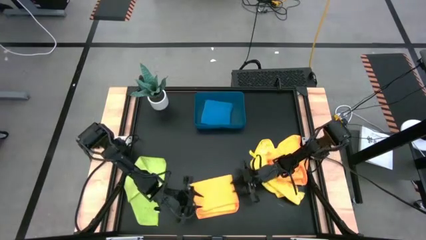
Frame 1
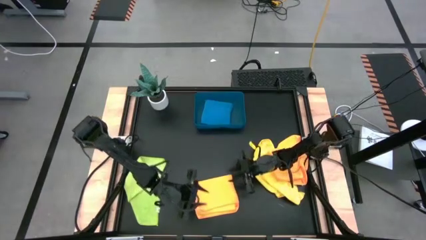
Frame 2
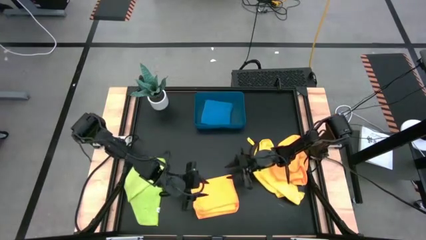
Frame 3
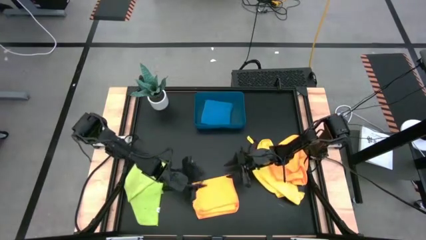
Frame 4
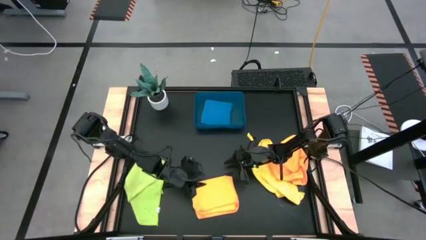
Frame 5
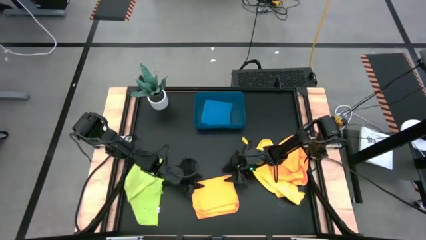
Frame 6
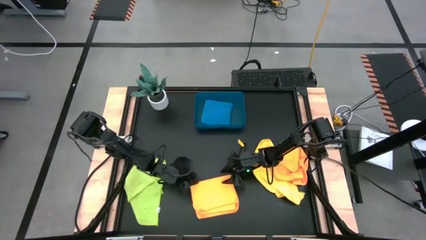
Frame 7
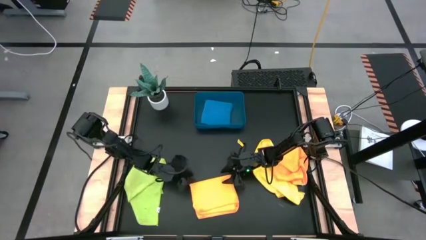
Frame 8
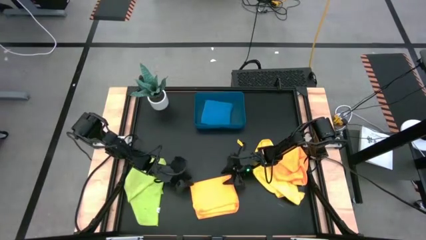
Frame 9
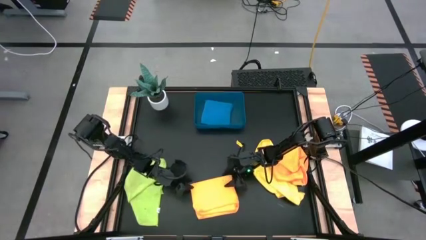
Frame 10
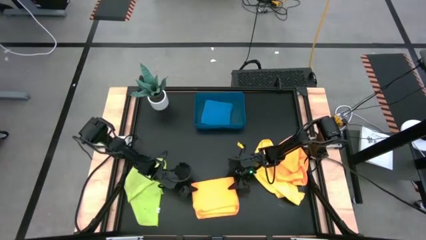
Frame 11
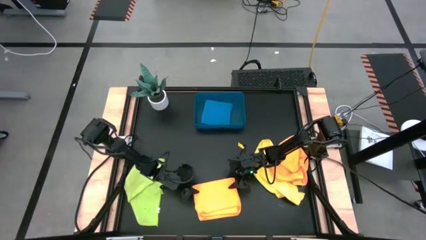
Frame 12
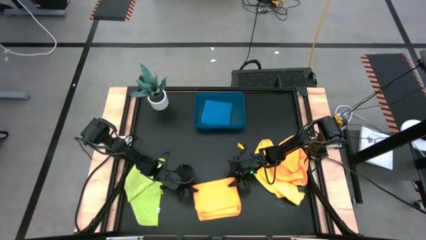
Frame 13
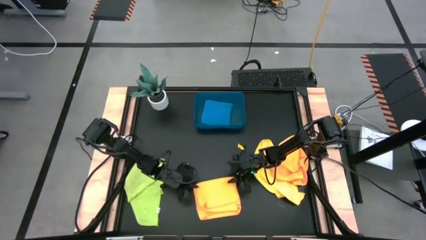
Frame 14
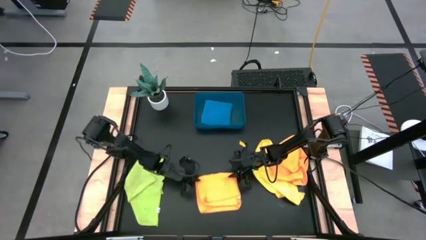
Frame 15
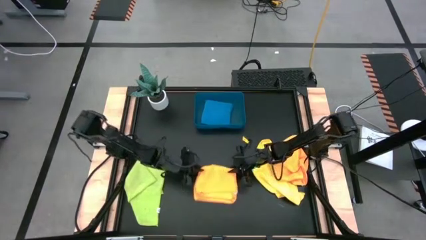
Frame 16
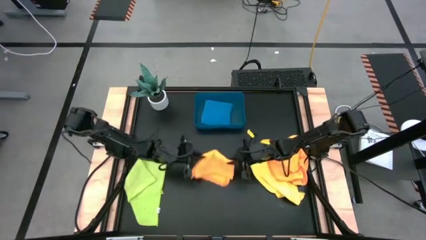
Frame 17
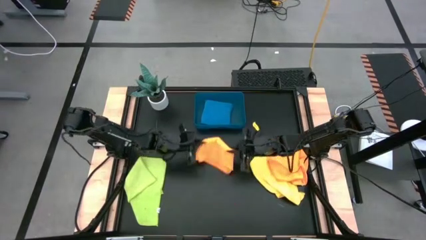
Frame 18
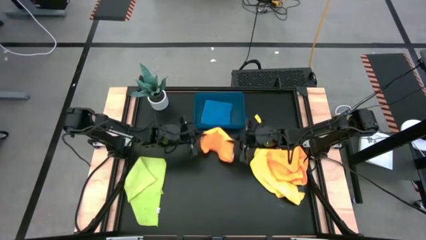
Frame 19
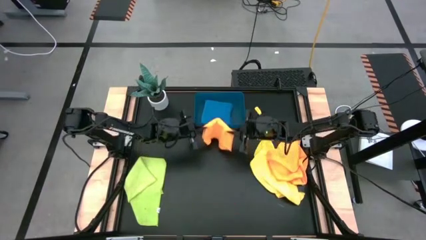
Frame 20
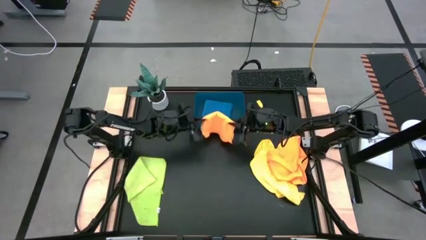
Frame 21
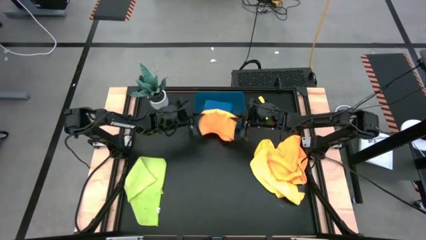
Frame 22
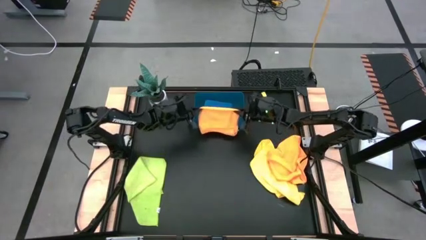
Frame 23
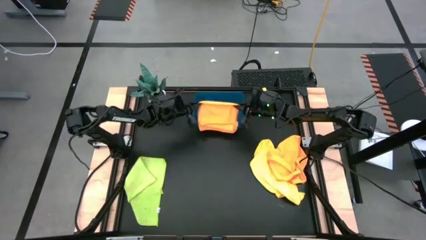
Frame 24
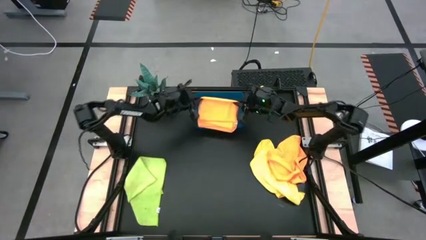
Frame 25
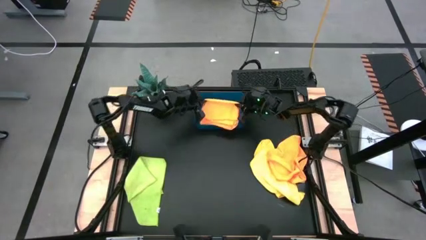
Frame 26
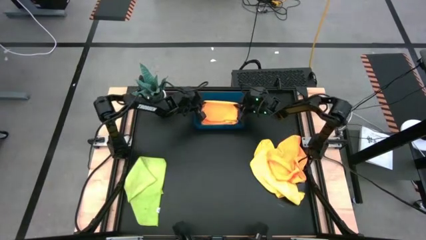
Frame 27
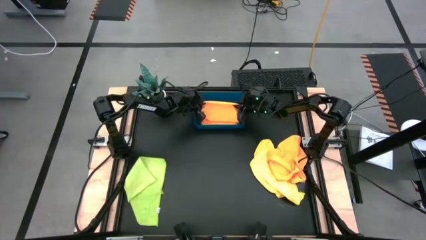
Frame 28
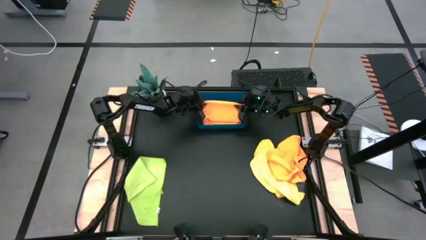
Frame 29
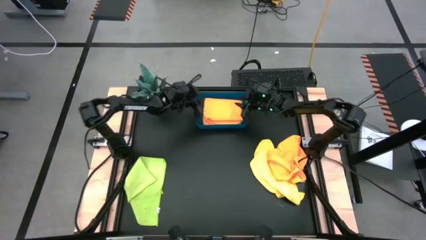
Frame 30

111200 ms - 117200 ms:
Task: Fold microfiber towels
Put the left orange microfiber cloth

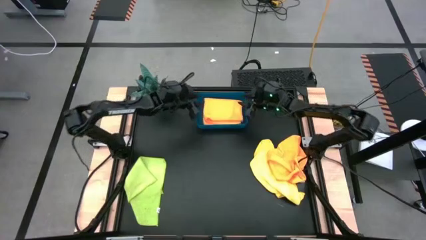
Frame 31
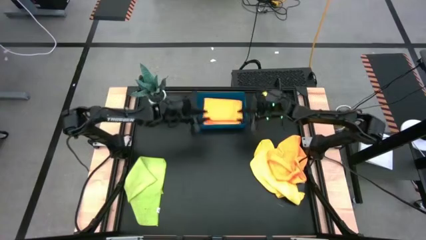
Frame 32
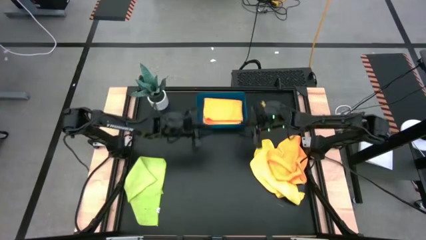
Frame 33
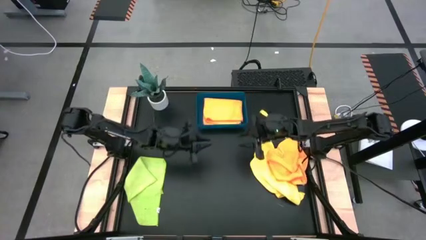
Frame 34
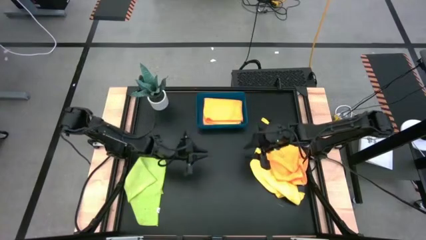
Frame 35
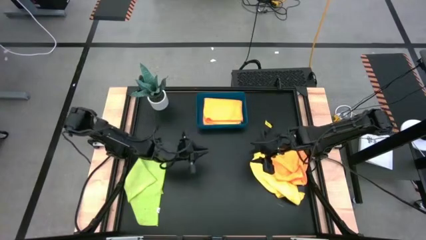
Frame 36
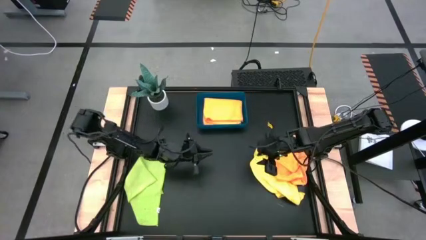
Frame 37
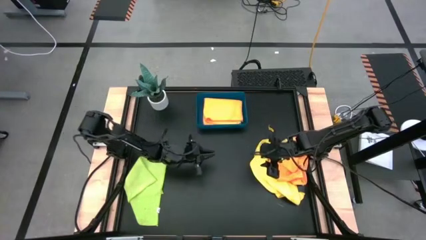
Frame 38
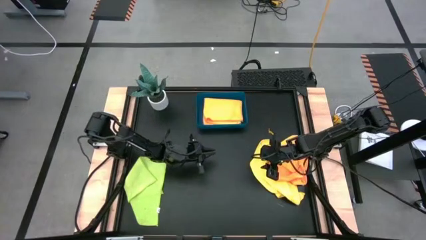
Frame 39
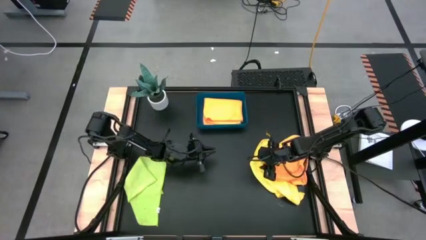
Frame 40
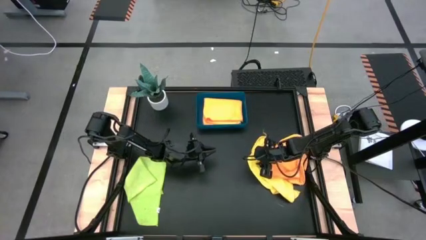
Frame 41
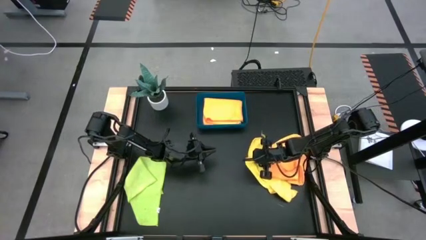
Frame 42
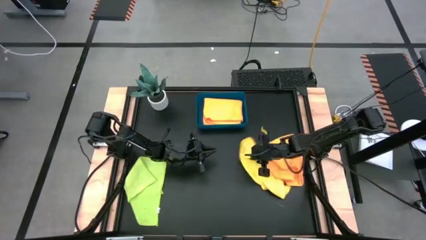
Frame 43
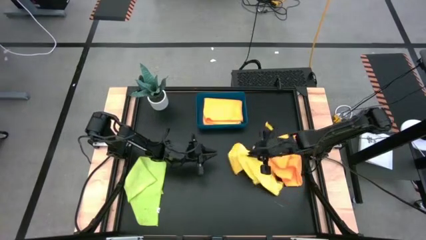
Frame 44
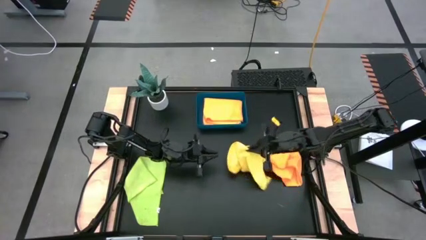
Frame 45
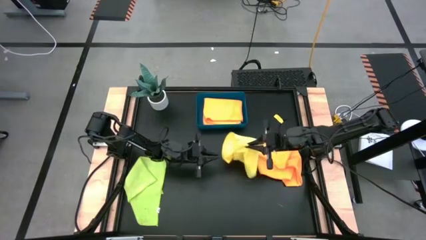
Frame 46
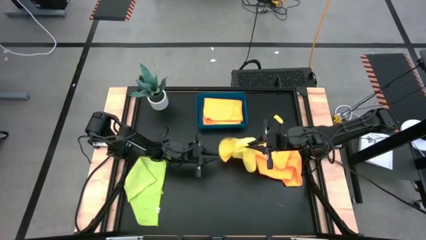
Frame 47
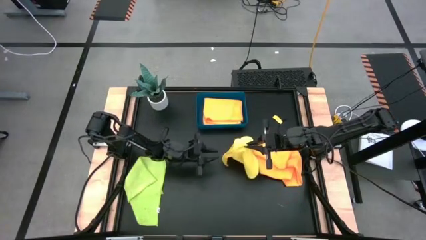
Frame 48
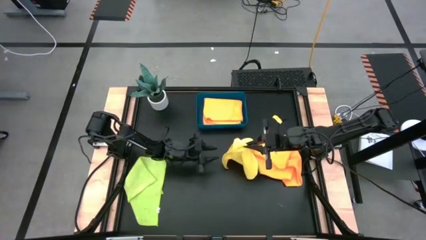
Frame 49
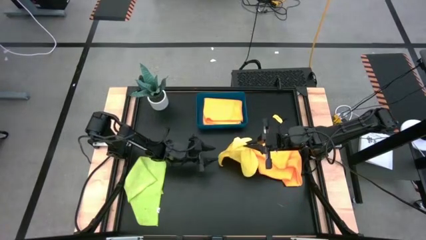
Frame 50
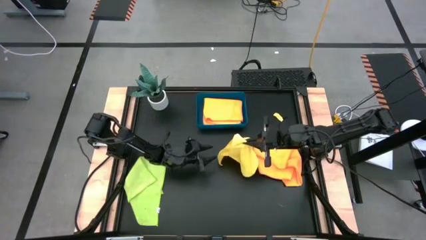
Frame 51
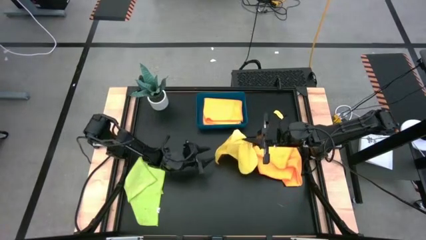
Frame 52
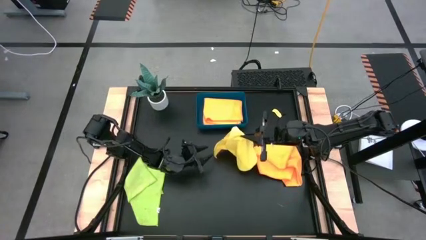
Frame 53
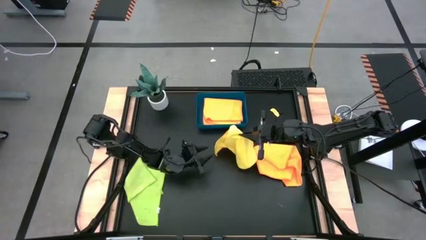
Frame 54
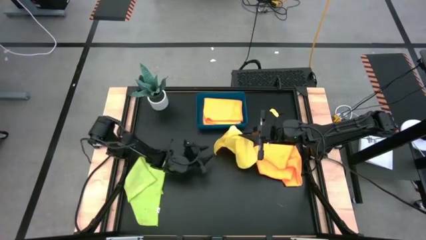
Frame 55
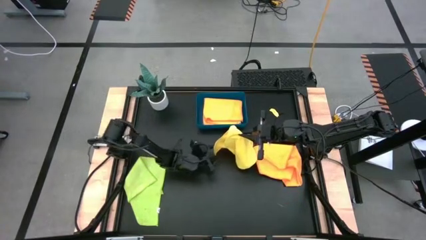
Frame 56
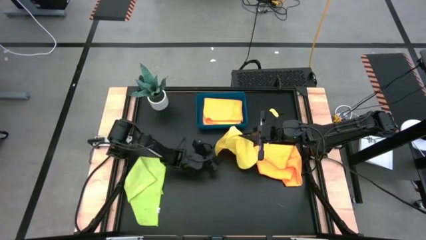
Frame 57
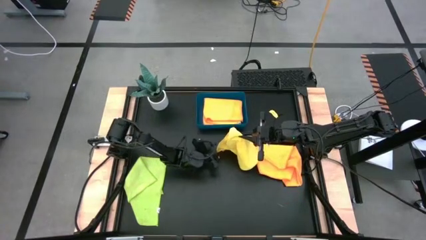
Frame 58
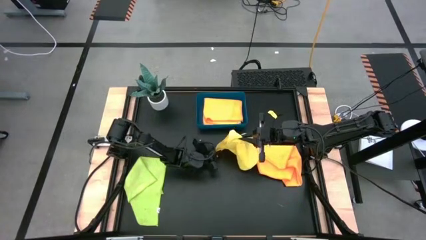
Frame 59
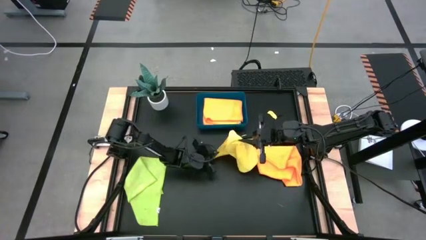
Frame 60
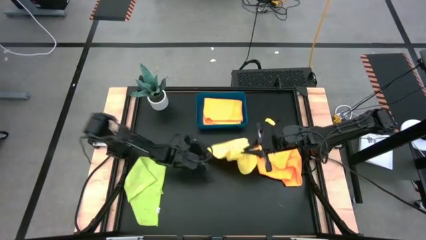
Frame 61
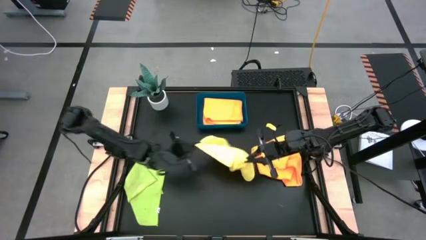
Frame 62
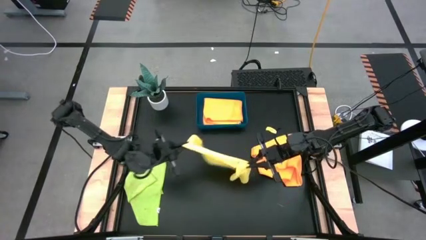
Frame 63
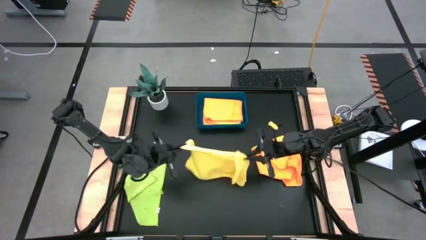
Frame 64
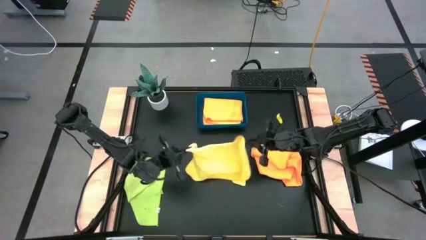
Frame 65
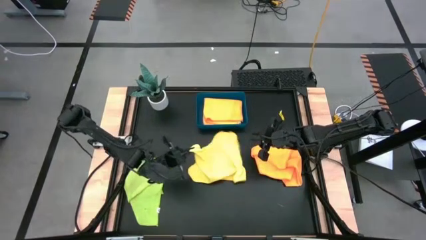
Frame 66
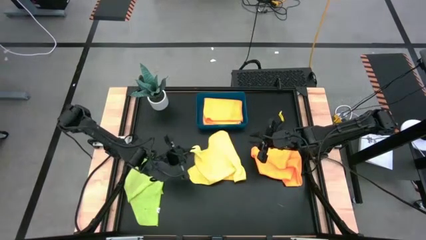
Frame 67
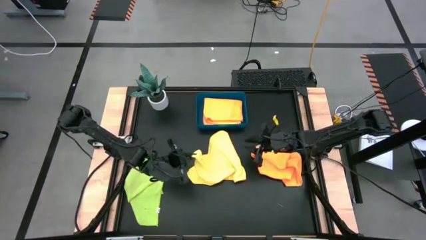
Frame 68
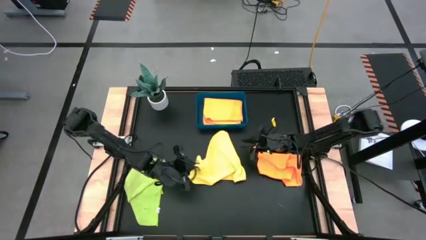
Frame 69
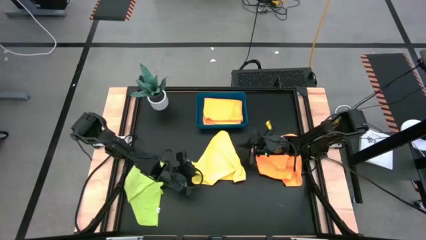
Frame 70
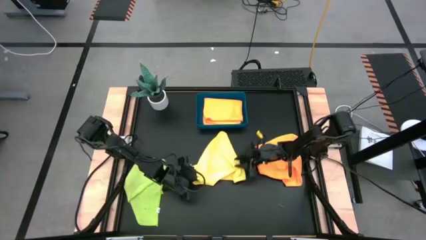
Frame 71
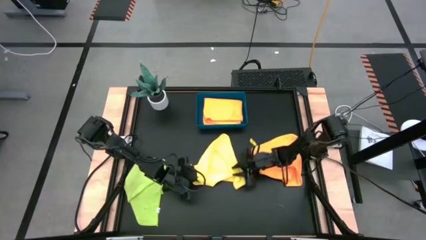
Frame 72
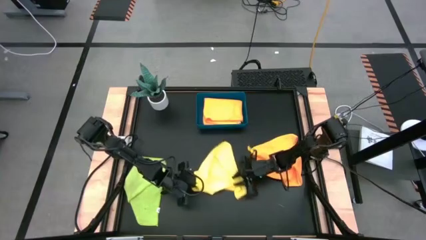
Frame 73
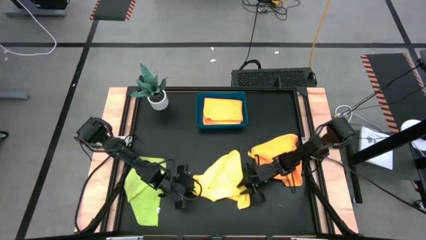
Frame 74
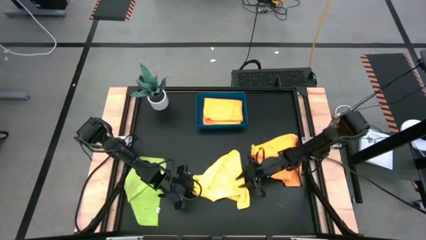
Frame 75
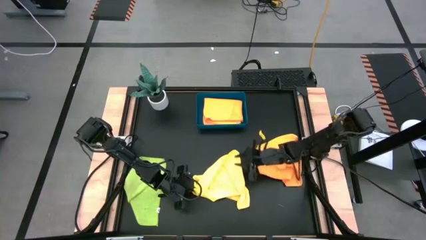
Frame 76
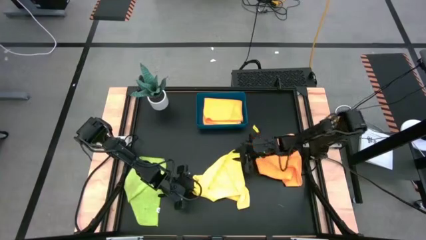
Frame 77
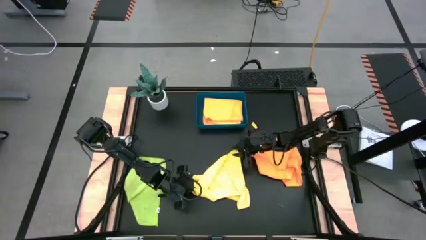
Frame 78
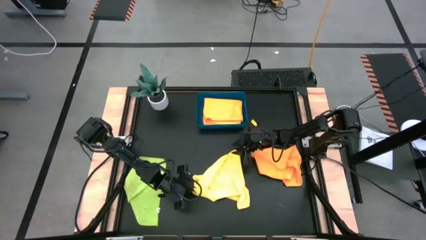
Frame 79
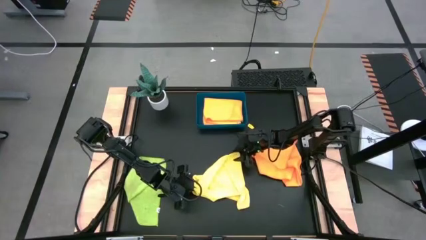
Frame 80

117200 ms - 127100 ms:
Fold the yellow microfiber cloth
